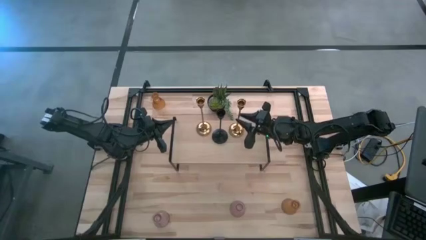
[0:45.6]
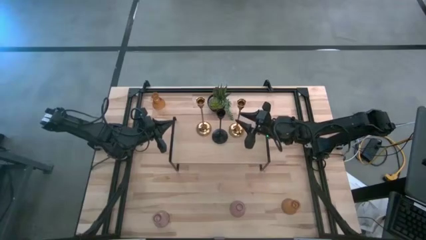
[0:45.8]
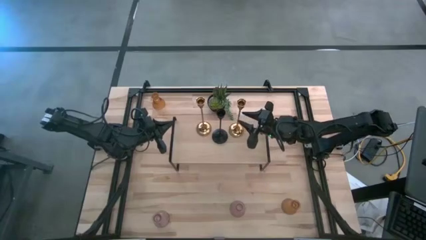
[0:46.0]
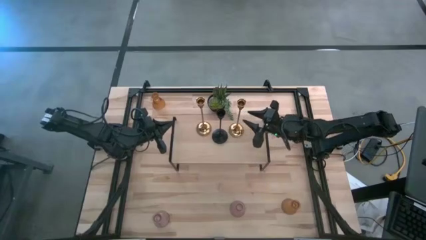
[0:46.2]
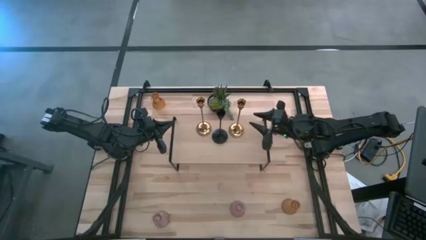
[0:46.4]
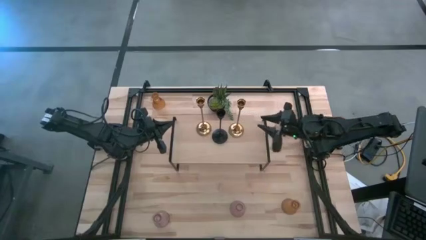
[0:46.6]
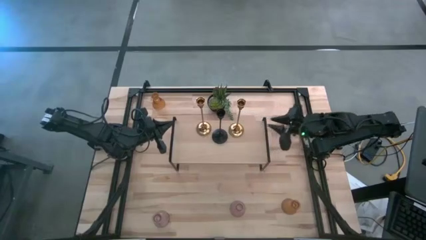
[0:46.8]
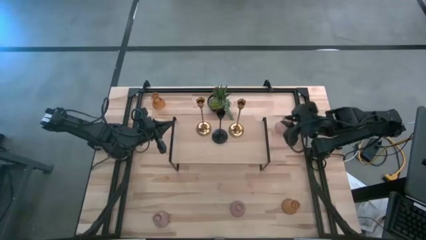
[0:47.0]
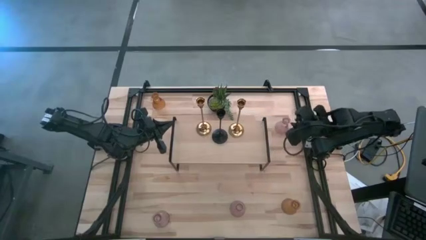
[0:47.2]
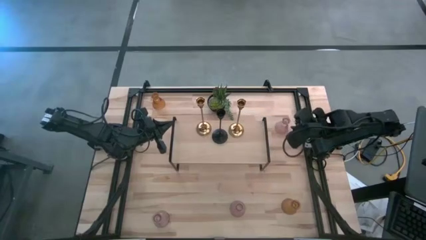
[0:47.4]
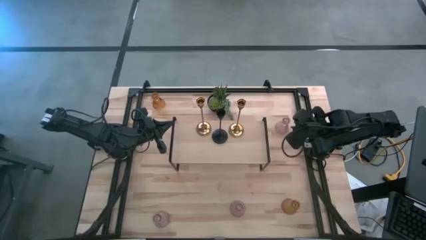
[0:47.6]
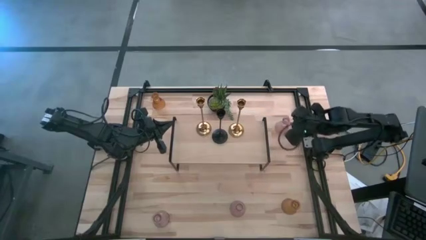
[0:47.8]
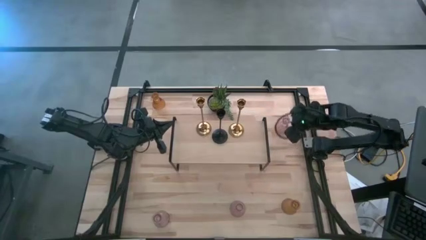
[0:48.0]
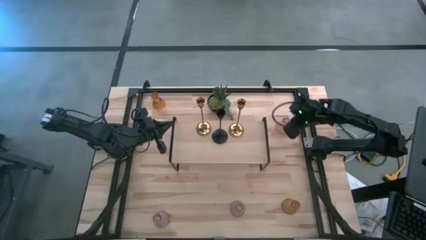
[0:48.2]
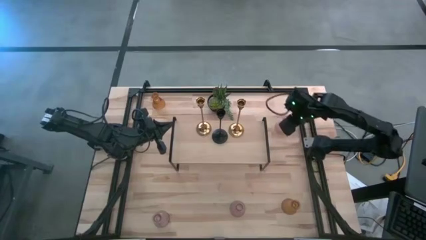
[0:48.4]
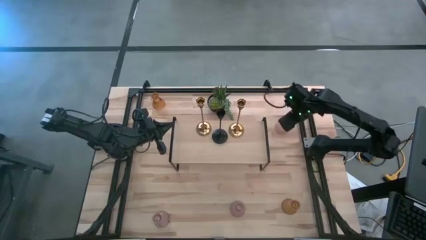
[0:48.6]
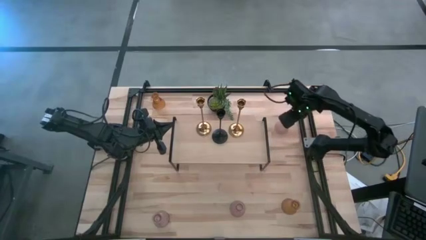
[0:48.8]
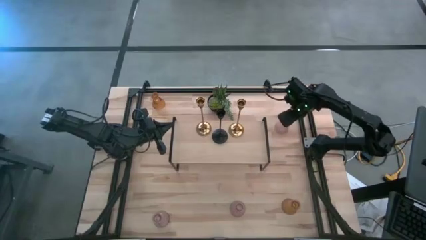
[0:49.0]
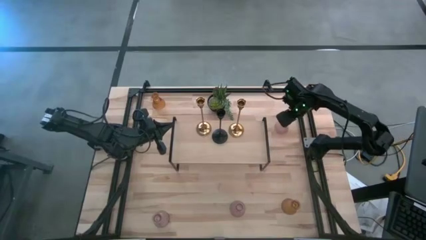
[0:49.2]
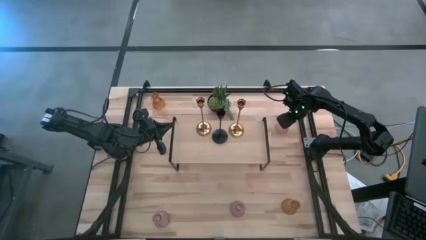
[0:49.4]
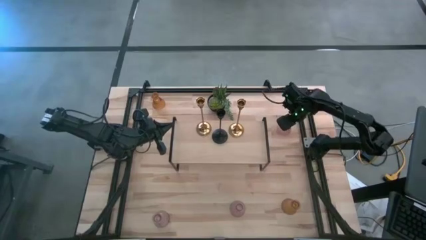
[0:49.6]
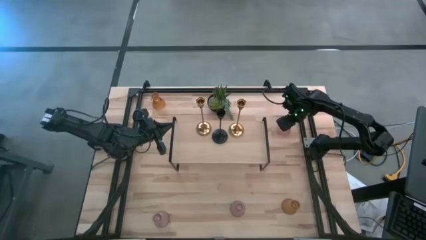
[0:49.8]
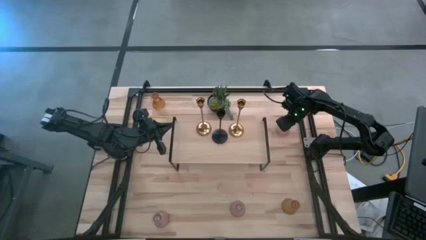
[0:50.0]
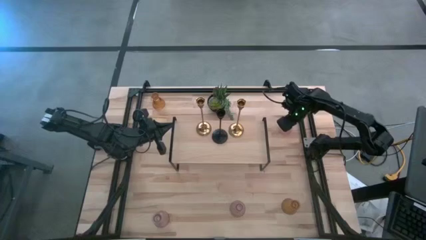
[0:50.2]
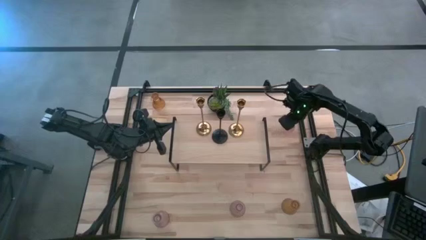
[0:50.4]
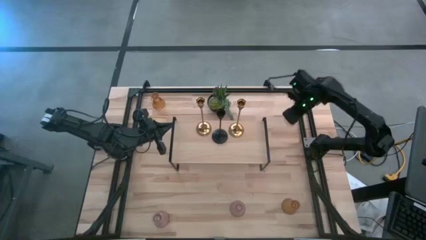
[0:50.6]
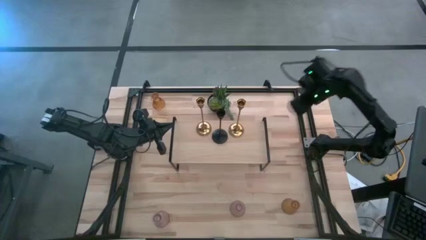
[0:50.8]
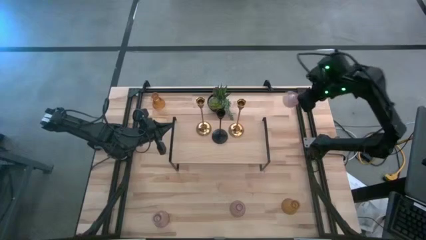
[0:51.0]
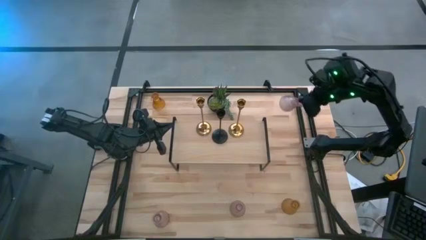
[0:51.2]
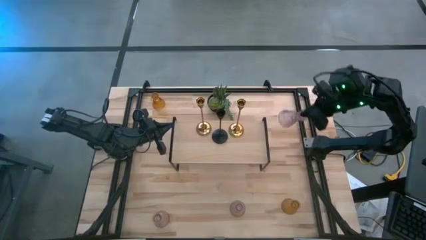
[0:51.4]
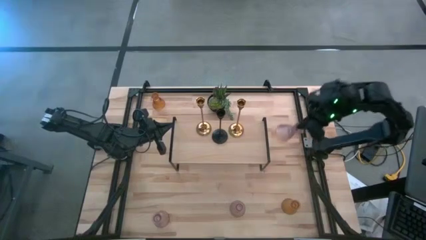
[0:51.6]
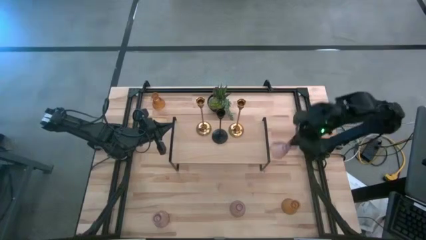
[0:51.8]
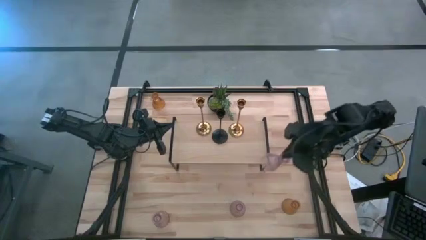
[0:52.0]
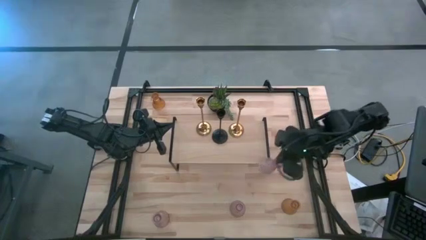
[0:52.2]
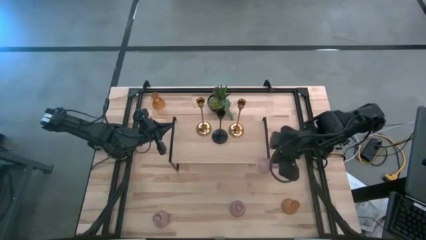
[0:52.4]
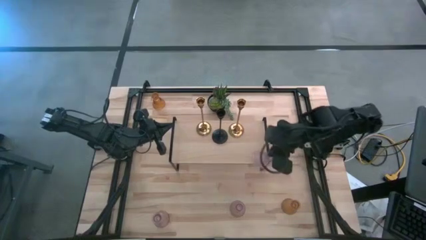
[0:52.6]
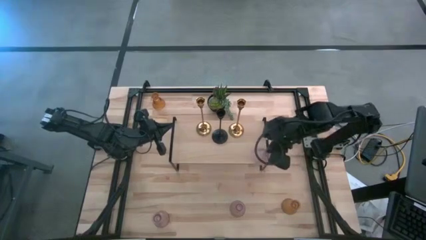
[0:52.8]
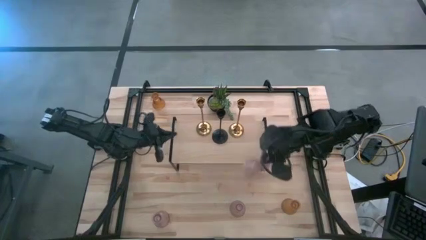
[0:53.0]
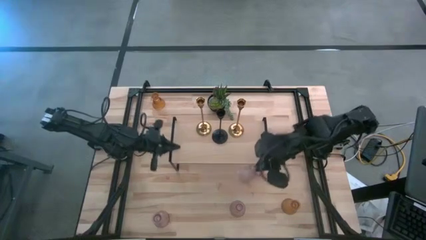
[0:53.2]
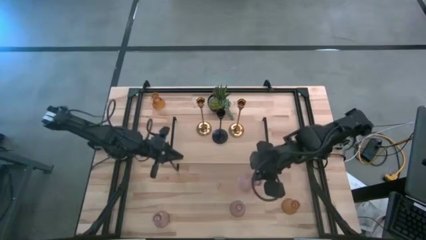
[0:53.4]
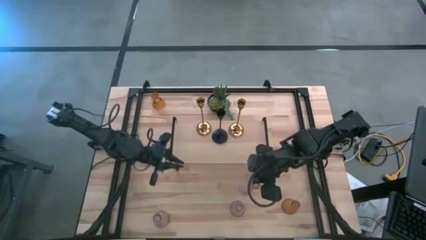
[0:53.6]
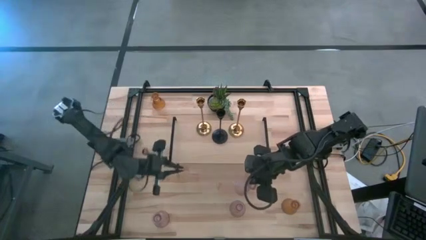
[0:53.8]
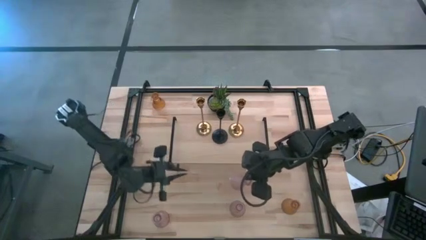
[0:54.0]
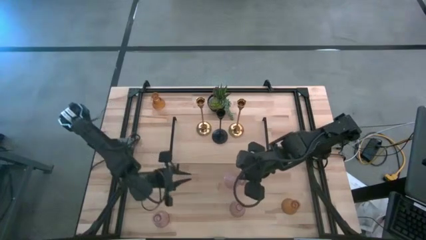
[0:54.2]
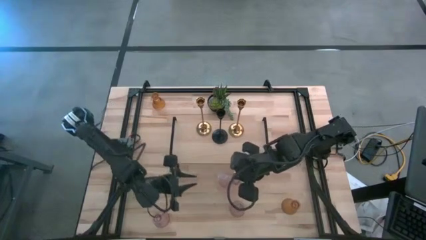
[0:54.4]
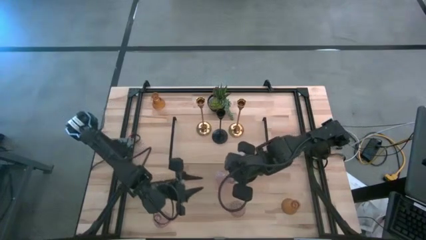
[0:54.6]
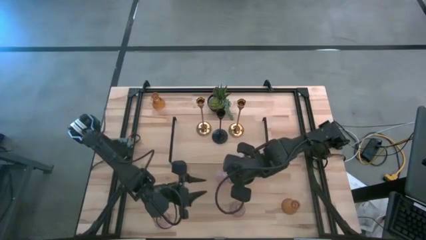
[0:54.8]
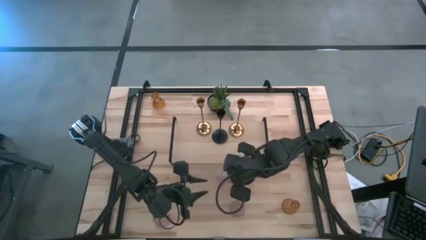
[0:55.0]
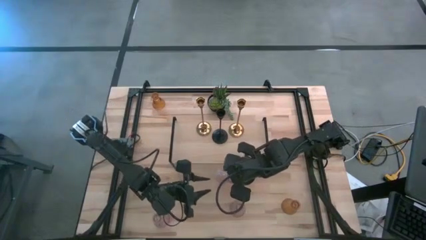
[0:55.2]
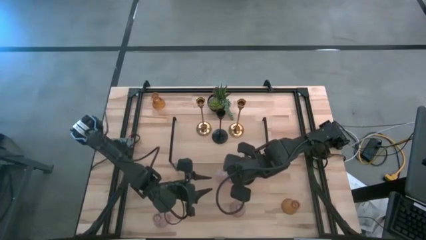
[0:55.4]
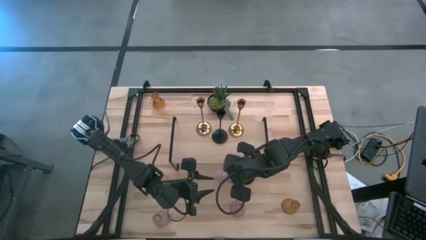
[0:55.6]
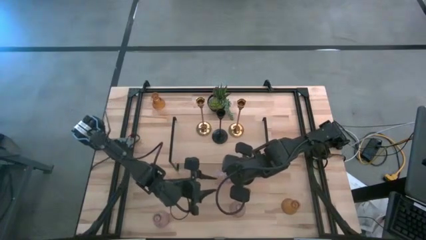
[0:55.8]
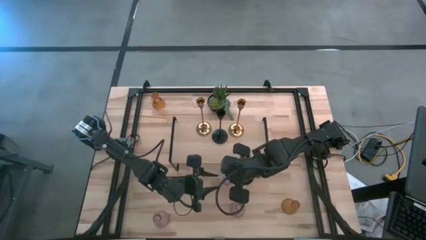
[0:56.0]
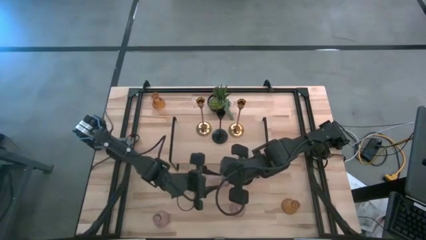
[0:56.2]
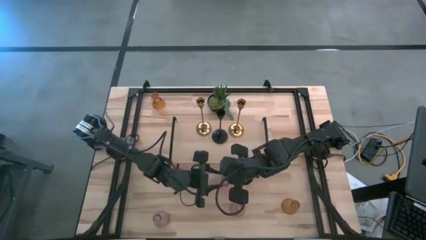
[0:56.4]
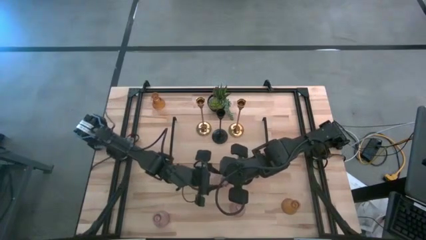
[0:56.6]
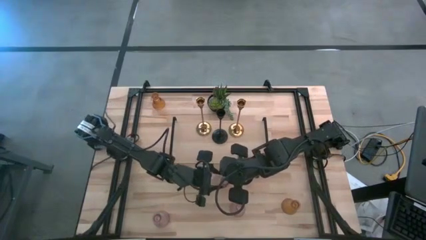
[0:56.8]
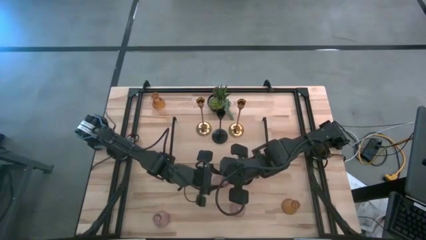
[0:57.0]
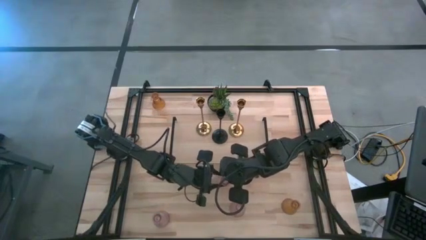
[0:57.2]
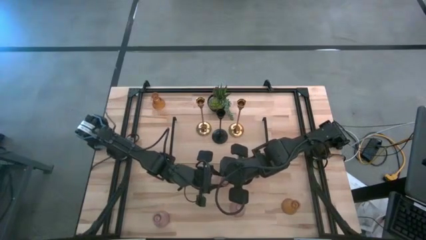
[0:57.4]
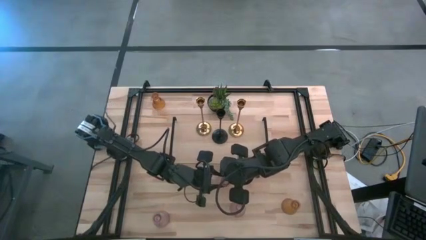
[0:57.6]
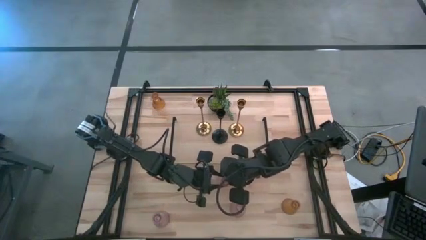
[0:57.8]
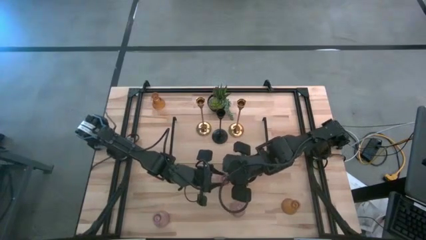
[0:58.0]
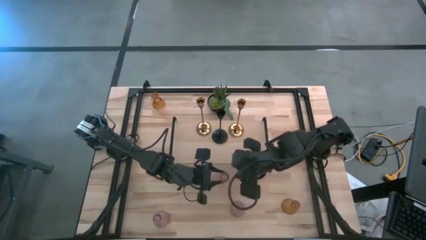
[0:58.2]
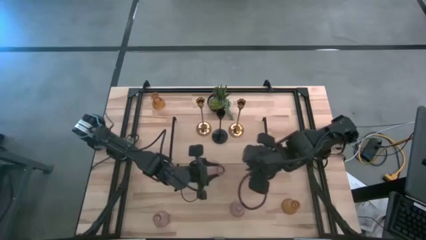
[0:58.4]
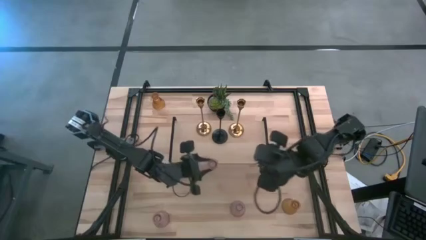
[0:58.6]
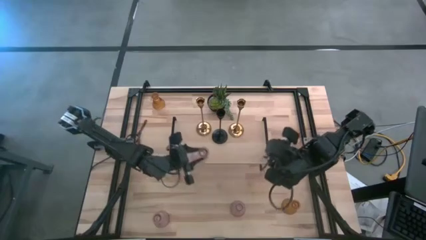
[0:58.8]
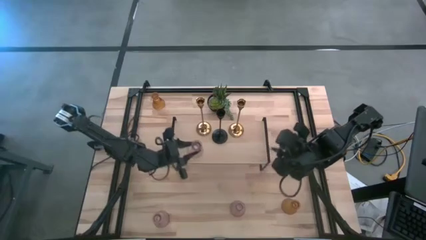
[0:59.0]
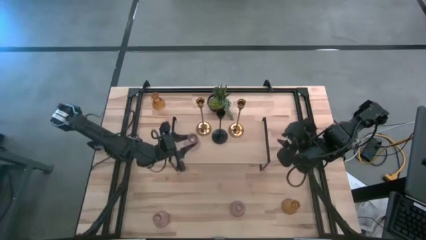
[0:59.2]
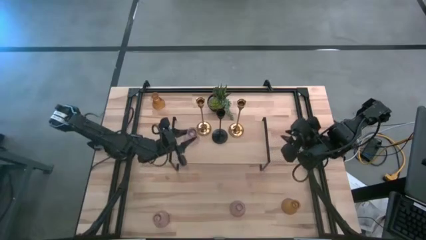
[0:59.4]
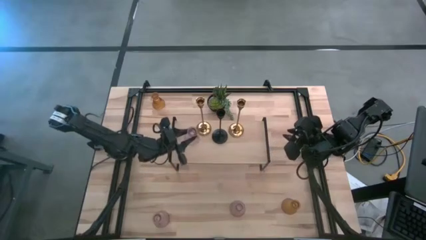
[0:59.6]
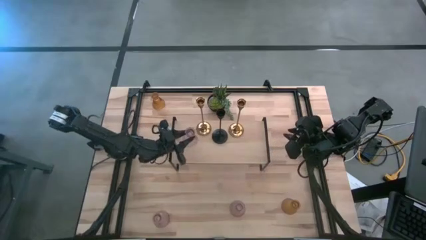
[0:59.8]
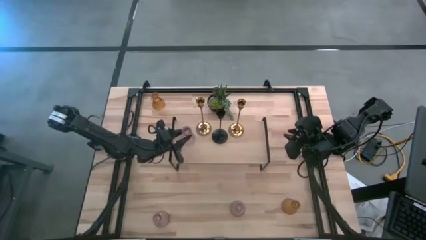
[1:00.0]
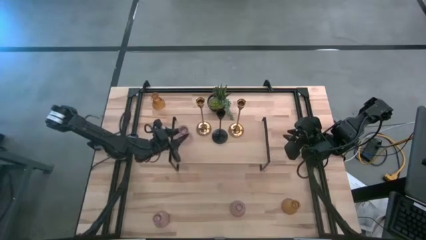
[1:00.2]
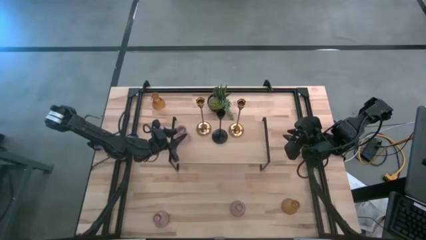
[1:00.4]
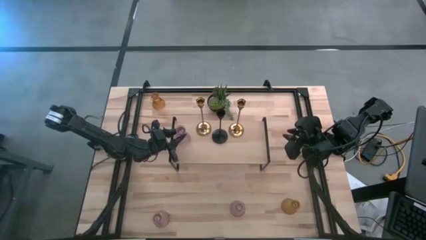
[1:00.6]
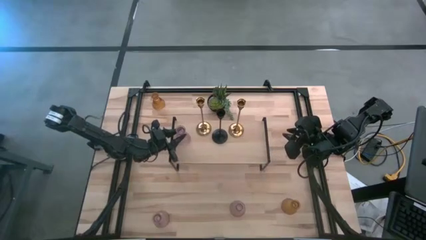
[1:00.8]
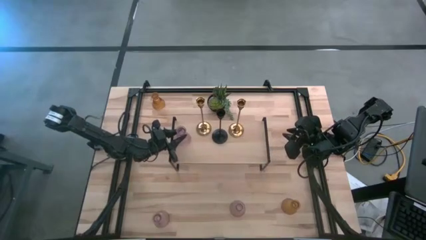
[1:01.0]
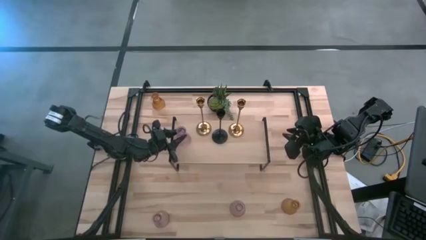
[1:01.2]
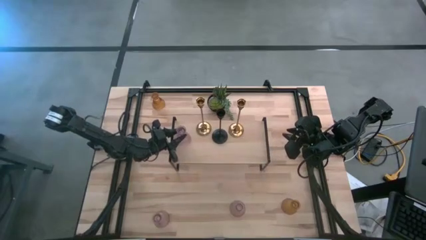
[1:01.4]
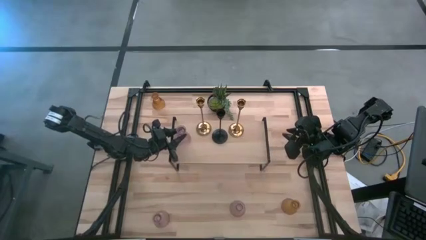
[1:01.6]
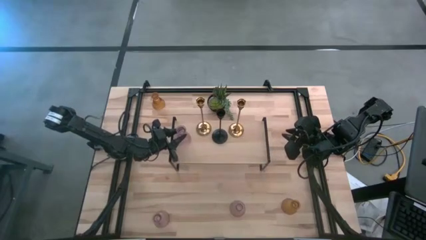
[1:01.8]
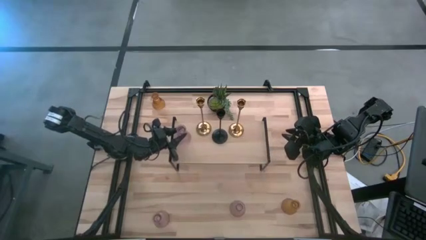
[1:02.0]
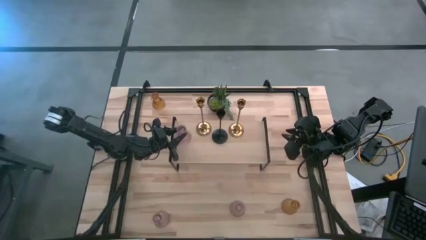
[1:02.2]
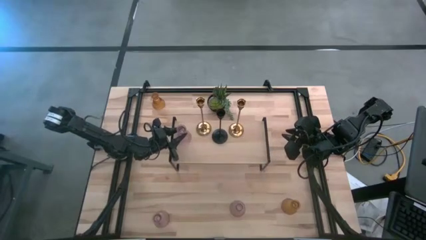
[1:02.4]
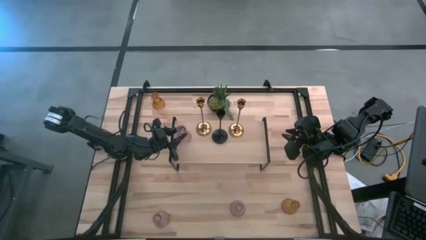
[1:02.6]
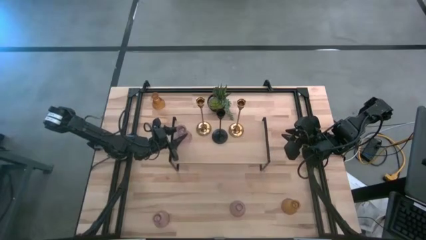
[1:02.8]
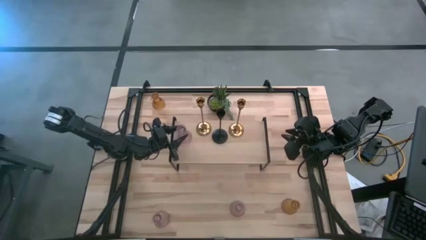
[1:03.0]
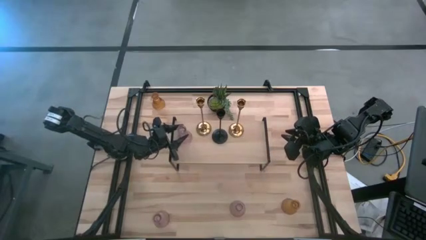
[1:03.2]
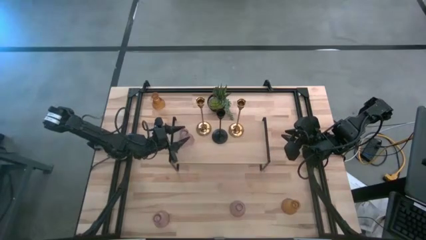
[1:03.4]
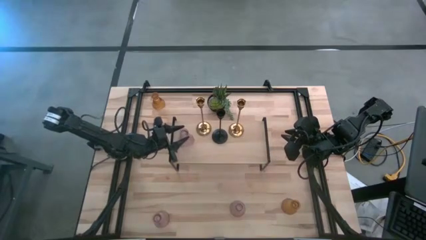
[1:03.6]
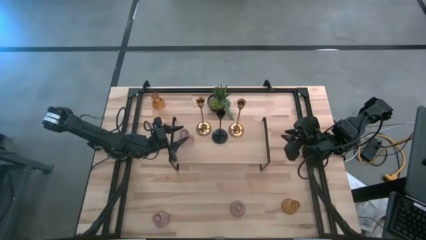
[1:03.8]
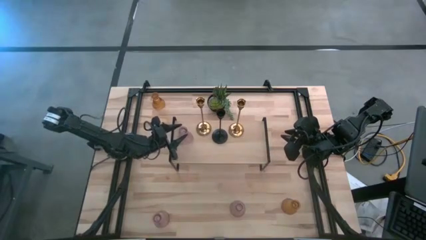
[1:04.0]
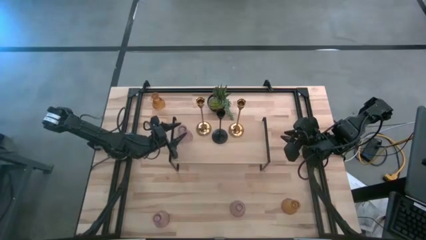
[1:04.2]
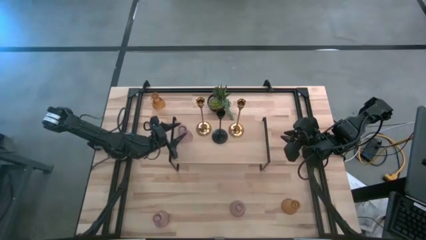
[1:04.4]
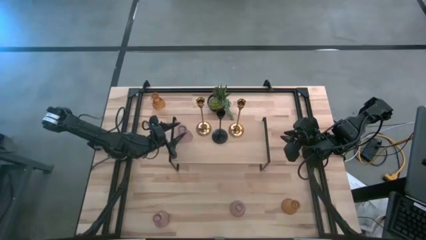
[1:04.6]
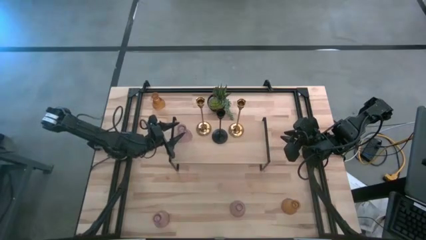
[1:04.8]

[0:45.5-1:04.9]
Task: Pick & Place candle stick holders
Put the top pink glass candle holder on the shelf
